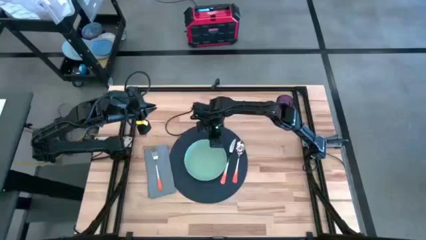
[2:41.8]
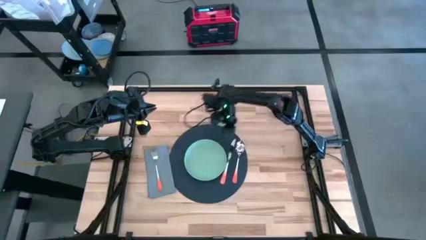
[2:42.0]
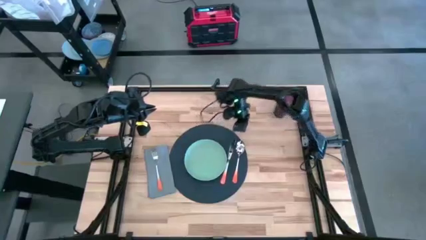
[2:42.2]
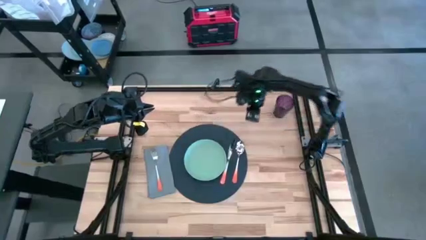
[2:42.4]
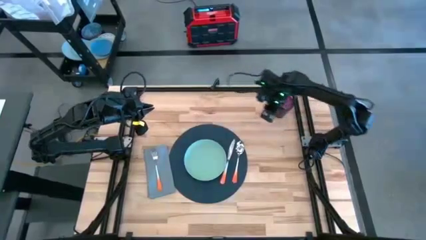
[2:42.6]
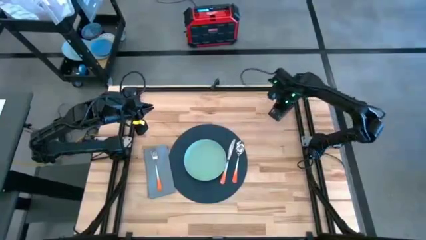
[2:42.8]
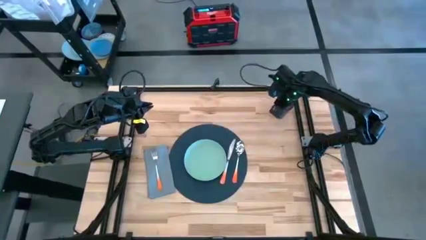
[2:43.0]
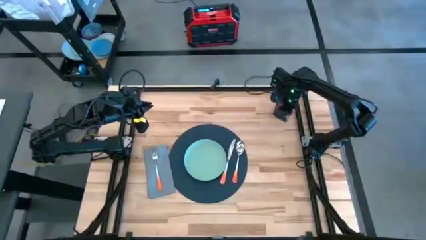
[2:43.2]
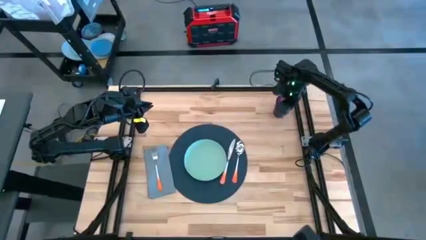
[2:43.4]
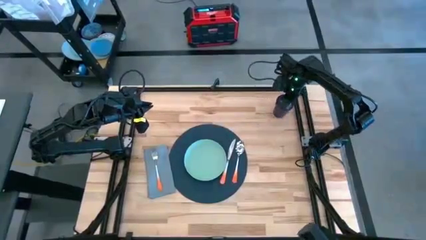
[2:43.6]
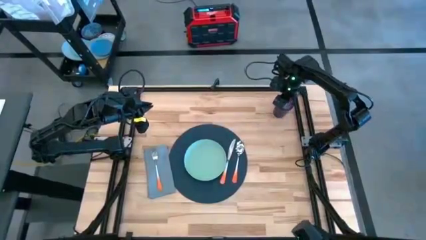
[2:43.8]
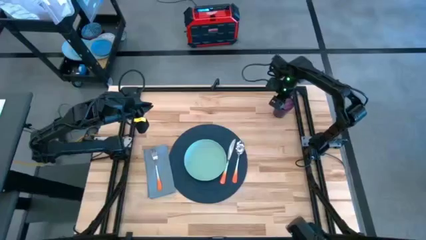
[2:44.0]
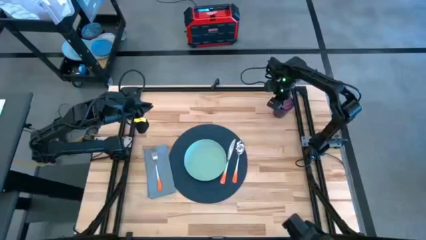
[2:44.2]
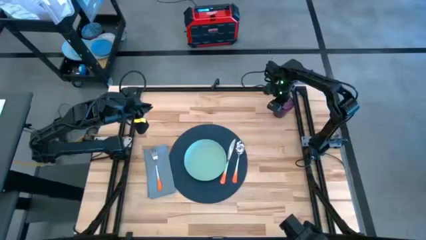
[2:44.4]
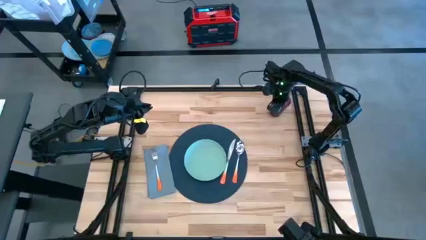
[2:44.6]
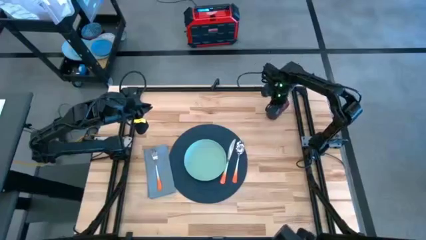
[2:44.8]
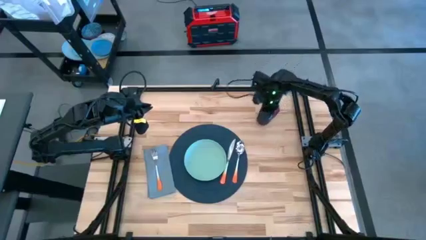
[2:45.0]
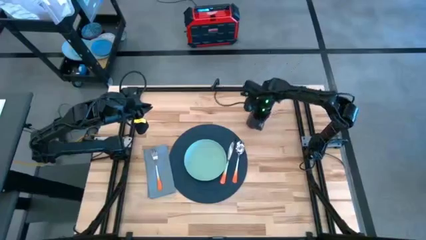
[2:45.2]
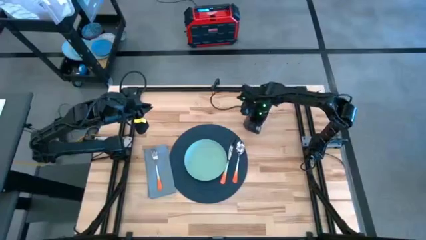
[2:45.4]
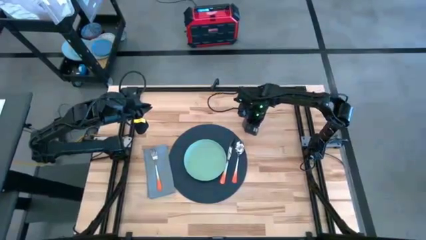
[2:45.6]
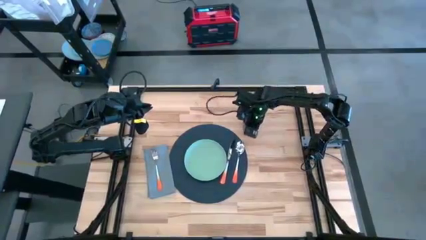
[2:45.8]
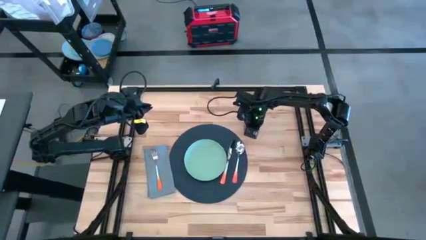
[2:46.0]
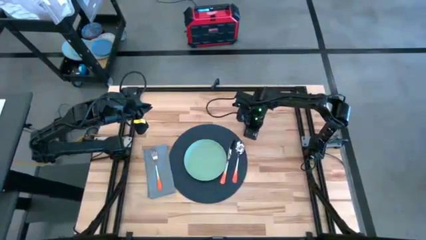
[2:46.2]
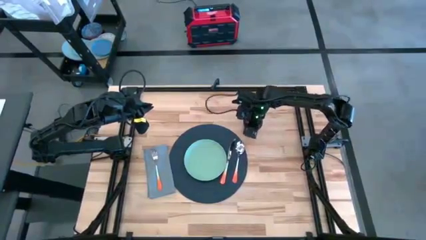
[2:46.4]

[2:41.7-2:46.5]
Task: Set table place
Move the purple cup to the top right of the dark gray placemat

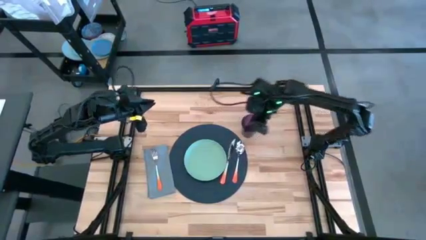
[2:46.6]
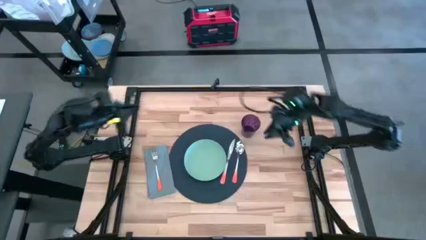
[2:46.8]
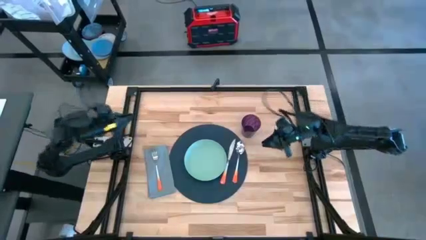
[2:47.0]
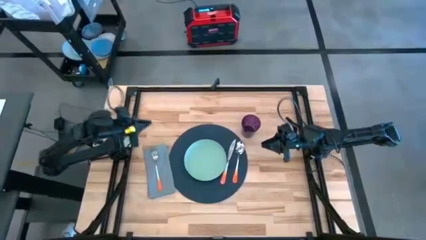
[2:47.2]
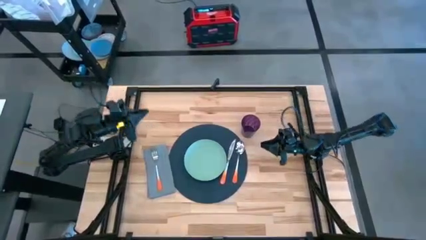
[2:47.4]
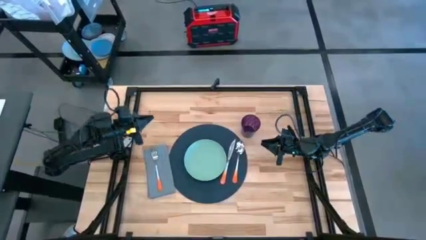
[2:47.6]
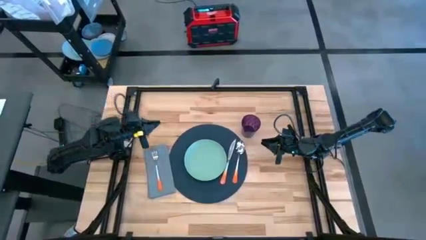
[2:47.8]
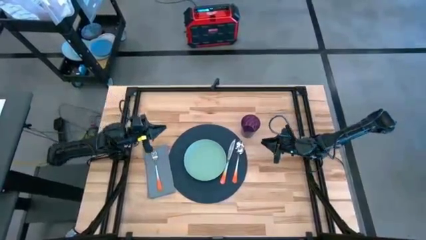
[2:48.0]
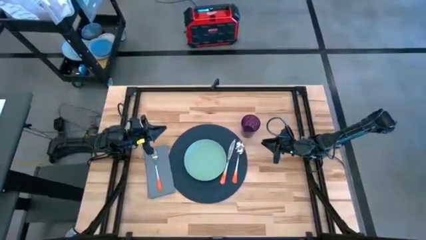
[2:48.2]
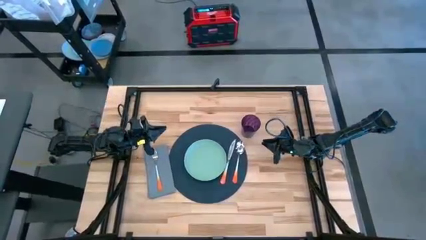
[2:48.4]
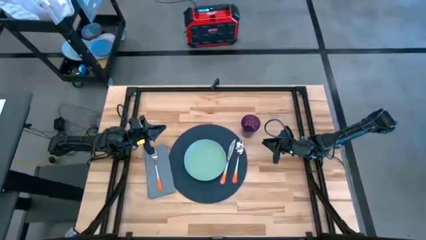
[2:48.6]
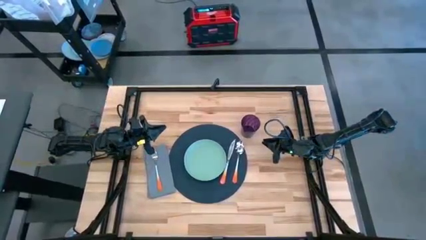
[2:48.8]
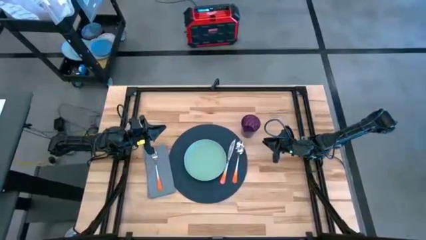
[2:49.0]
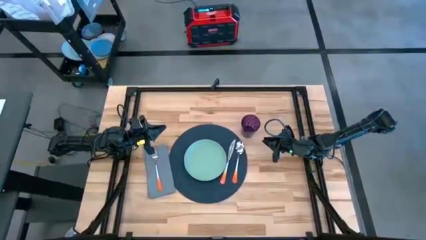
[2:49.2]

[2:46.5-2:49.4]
Return to Home Position

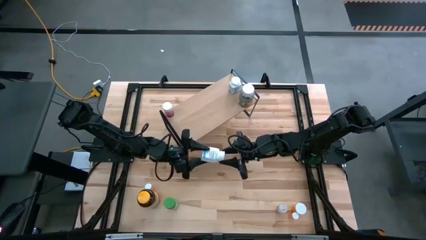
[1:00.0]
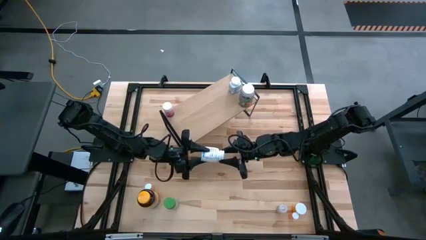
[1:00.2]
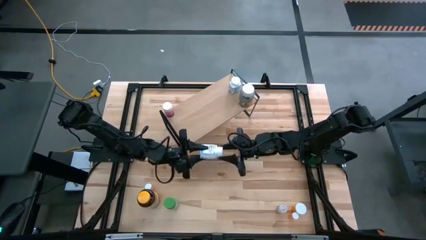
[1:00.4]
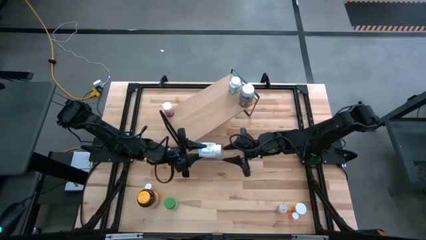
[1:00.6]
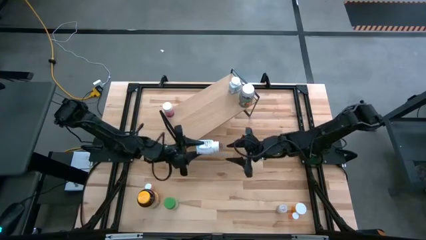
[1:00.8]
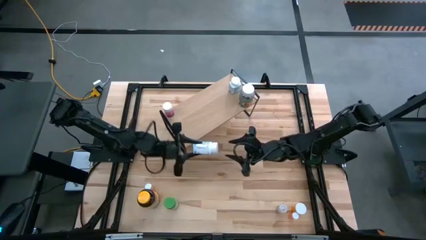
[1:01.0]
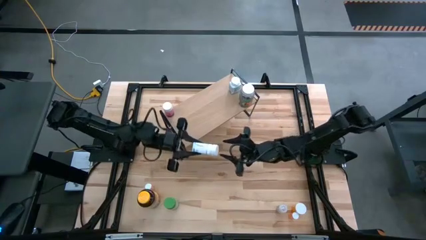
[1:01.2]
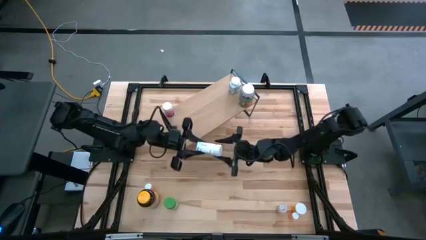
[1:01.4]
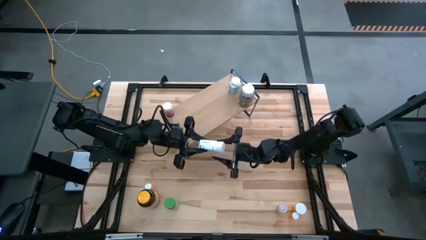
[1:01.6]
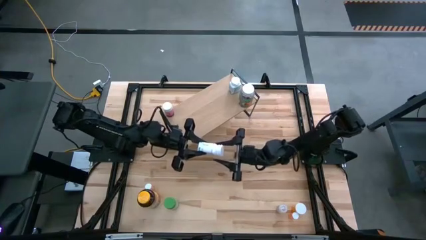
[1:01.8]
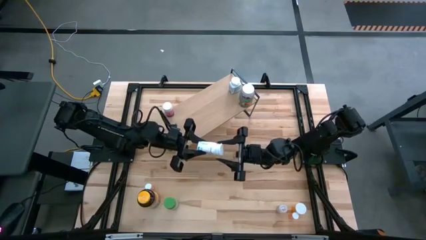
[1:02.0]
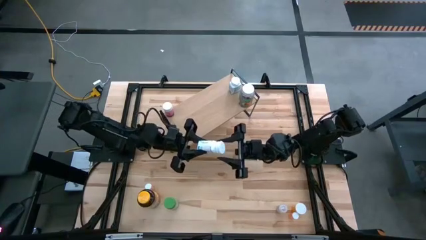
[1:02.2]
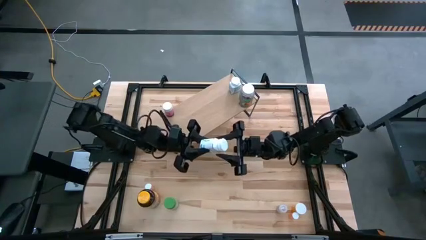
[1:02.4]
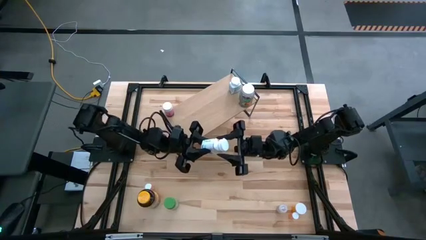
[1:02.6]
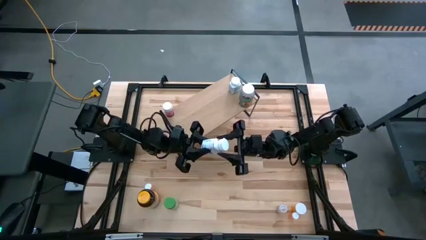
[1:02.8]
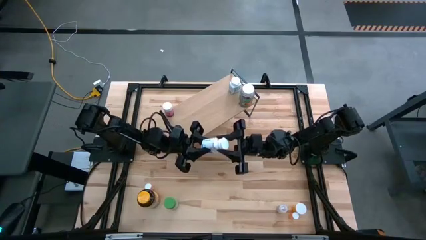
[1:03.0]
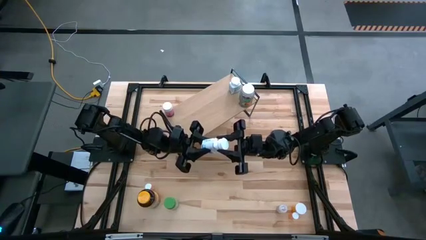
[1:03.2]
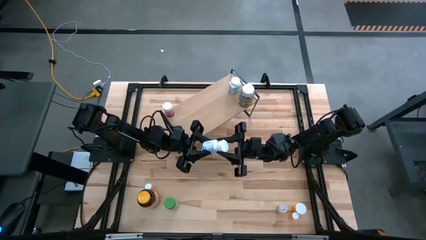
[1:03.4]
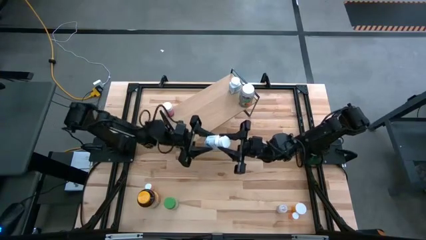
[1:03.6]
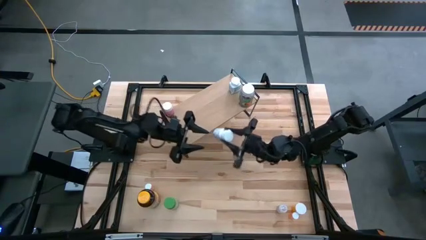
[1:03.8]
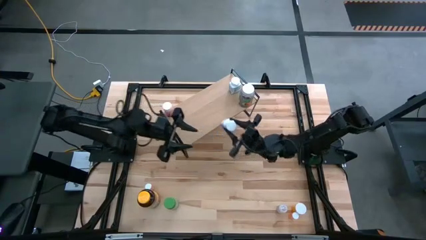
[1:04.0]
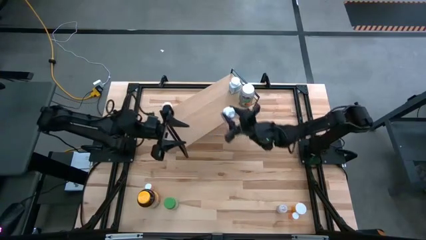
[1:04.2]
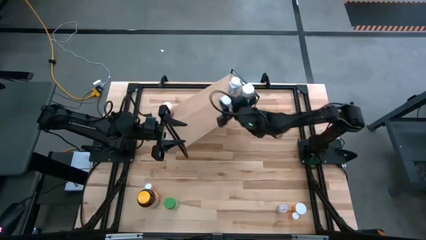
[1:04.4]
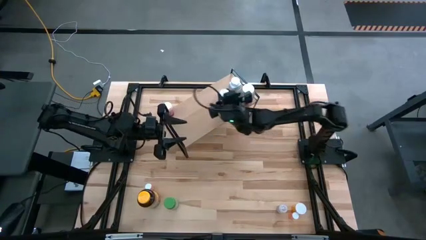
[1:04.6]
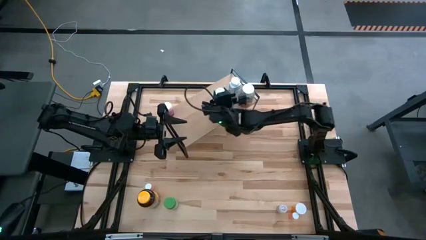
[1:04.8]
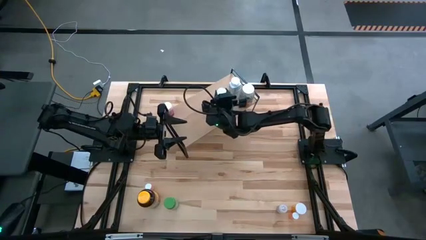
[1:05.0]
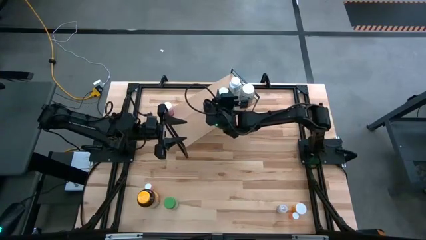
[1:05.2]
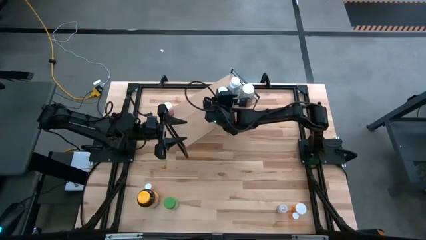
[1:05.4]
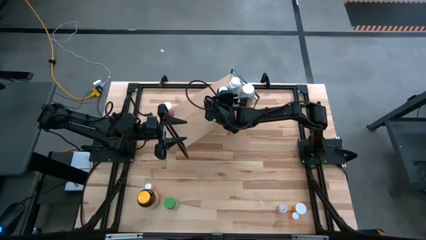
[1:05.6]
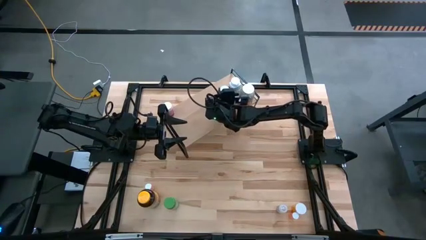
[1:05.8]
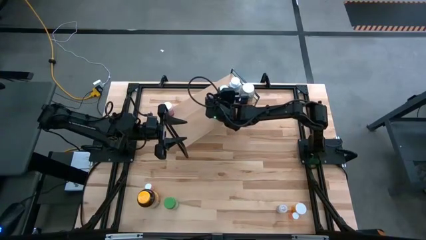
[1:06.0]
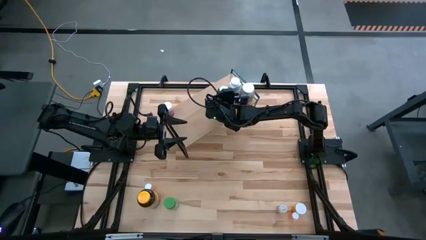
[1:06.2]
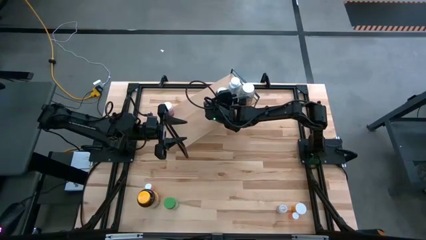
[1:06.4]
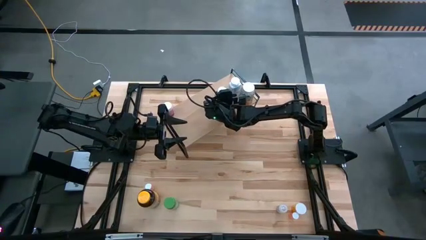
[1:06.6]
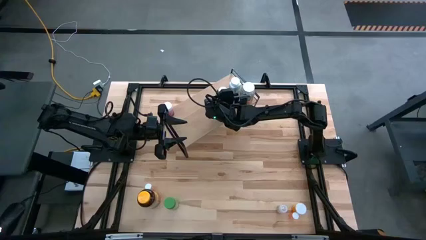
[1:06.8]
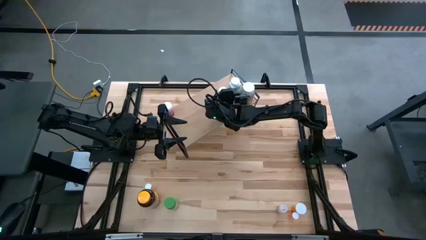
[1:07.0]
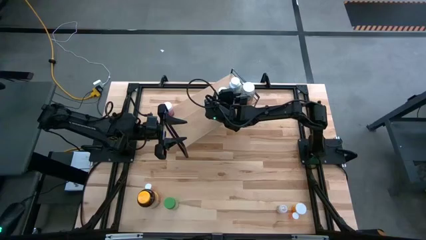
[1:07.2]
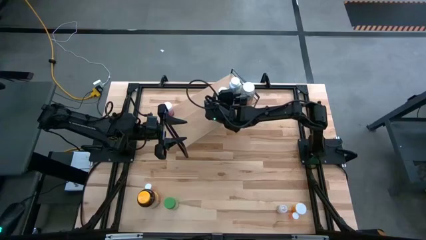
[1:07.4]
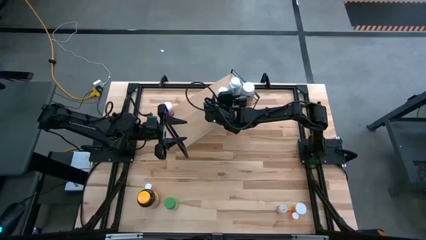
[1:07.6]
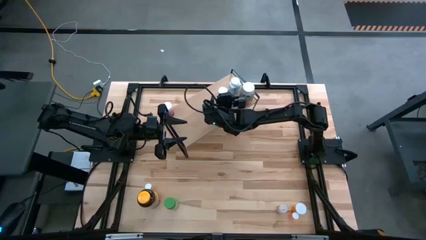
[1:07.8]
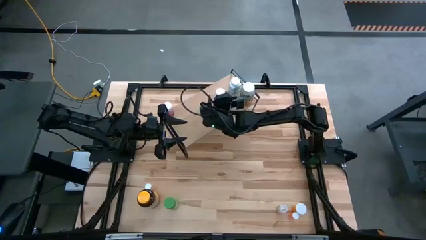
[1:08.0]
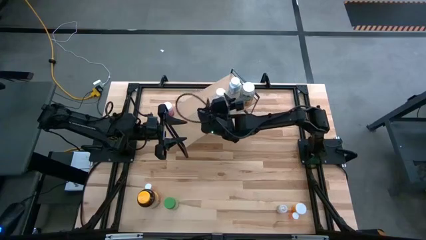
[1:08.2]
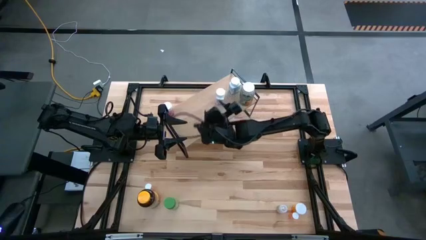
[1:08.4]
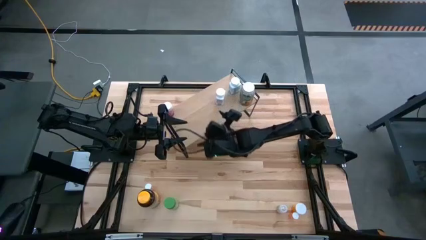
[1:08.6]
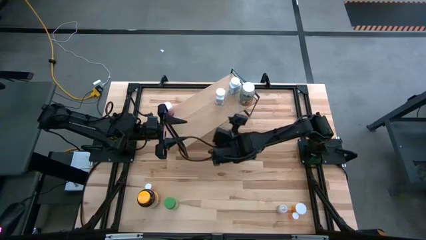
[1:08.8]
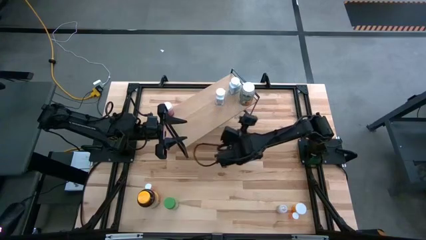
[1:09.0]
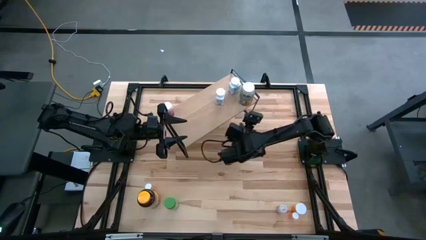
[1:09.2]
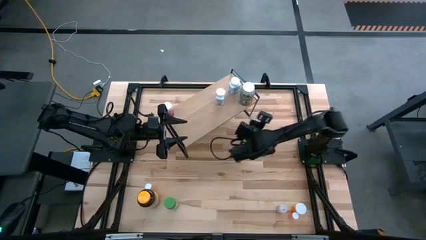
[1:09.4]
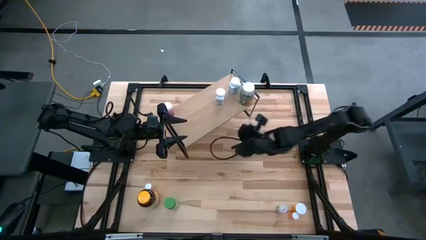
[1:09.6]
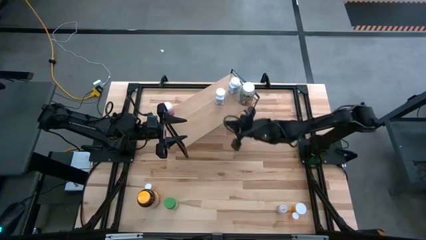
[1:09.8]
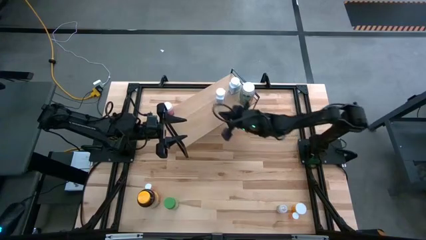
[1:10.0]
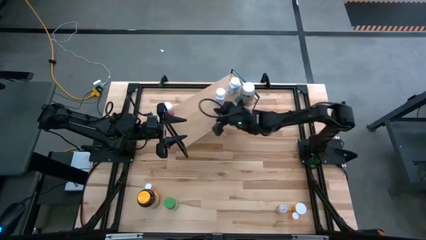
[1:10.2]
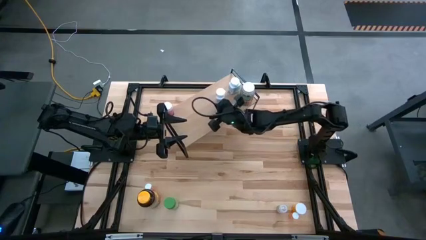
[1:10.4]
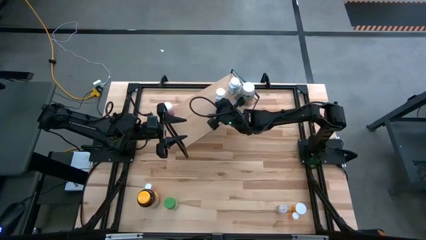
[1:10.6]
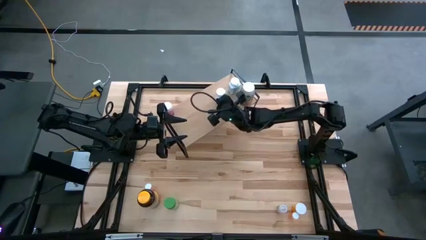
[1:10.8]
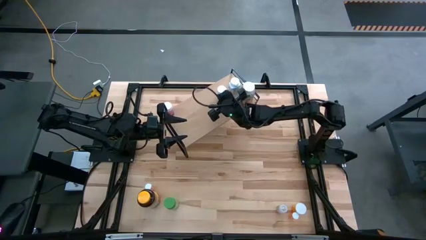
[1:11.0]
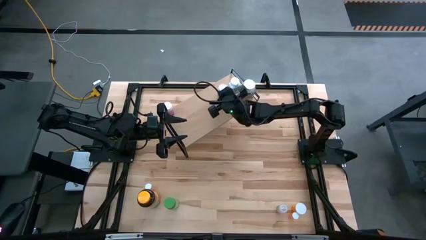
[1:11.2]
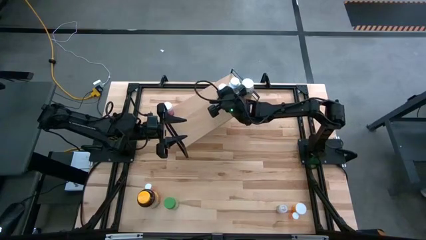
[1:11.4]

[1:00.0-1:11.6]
Task: Pick and place medicine bottles onto shelf by color
Put the blue bottle on the shelf
